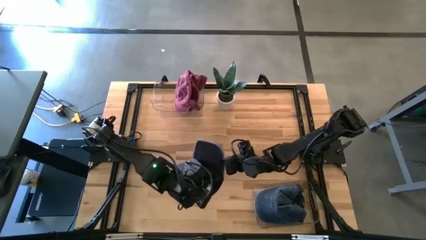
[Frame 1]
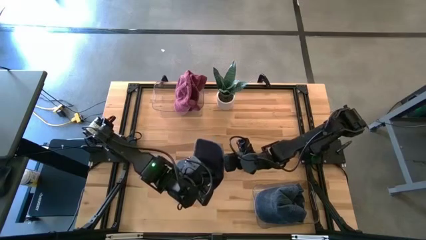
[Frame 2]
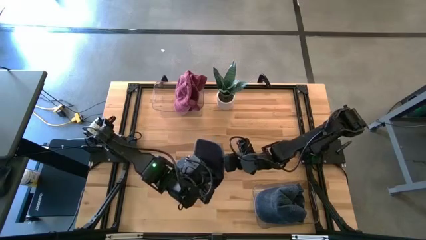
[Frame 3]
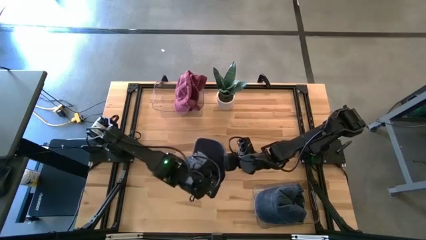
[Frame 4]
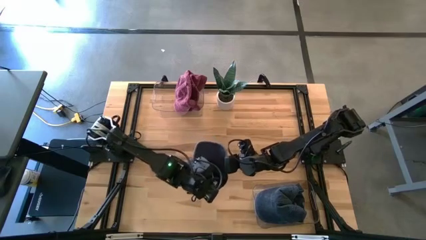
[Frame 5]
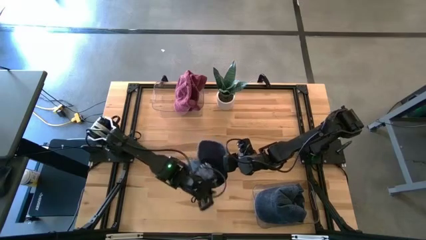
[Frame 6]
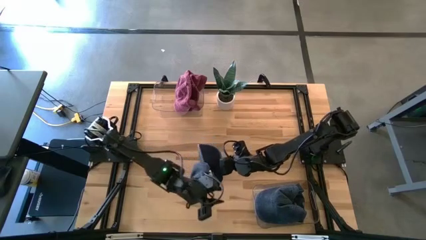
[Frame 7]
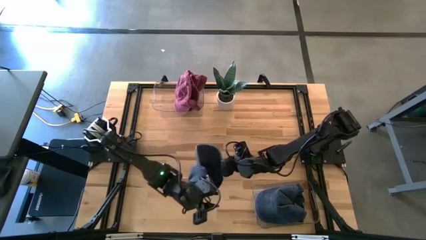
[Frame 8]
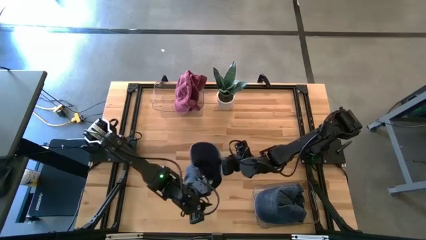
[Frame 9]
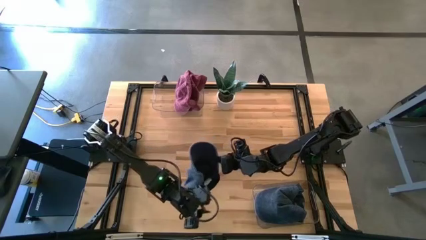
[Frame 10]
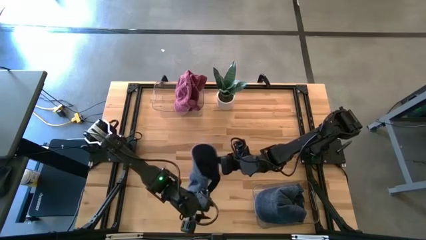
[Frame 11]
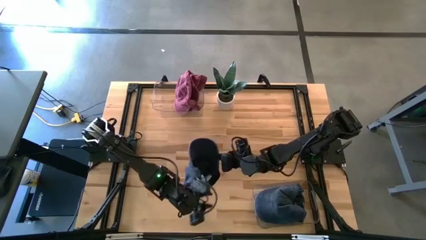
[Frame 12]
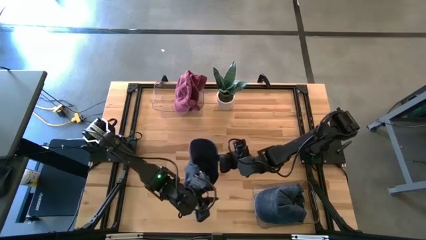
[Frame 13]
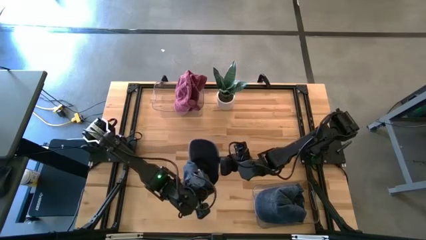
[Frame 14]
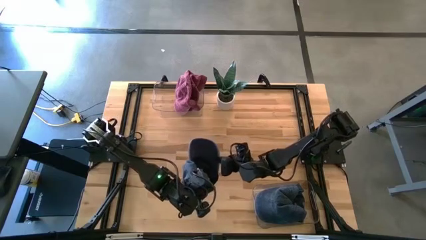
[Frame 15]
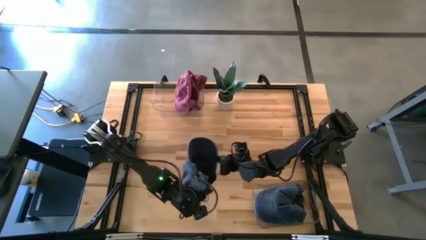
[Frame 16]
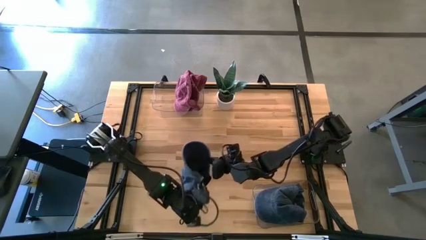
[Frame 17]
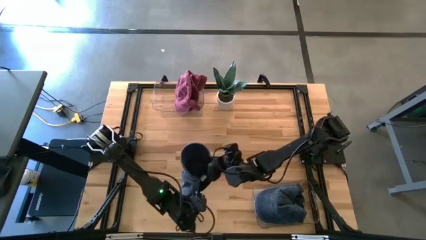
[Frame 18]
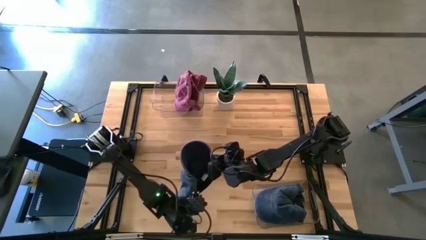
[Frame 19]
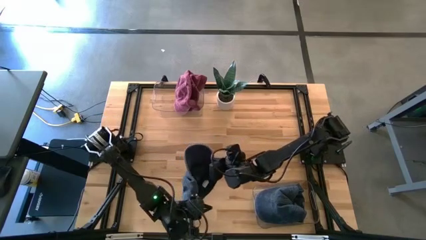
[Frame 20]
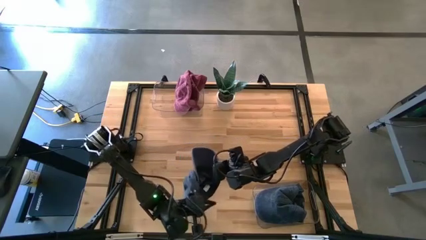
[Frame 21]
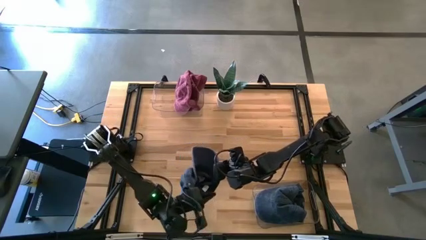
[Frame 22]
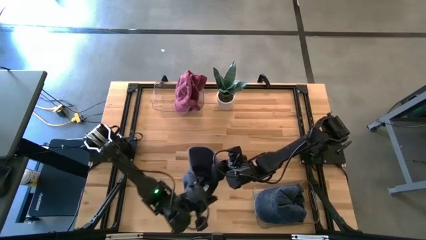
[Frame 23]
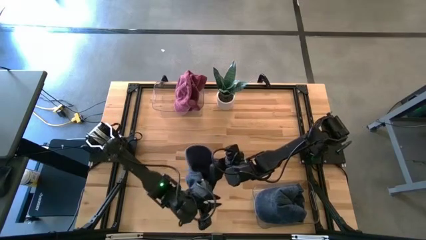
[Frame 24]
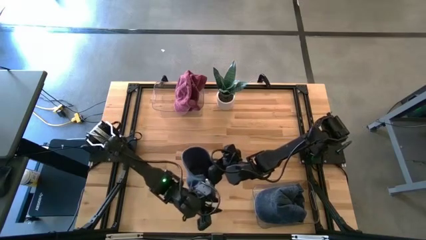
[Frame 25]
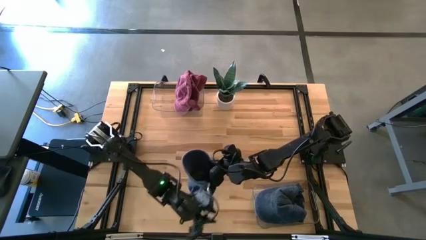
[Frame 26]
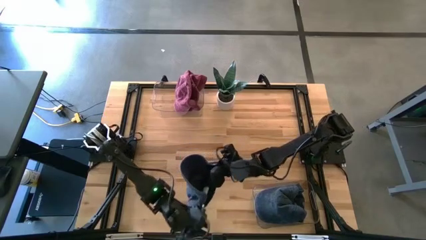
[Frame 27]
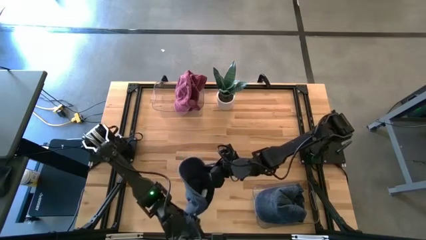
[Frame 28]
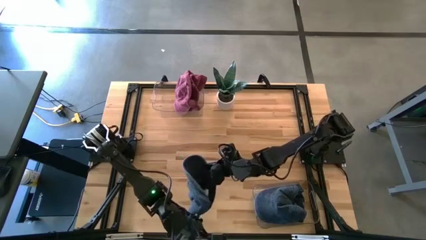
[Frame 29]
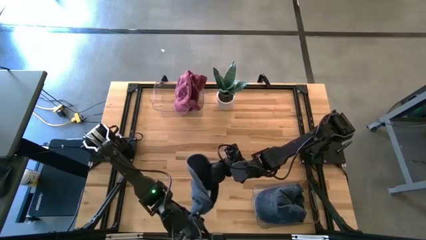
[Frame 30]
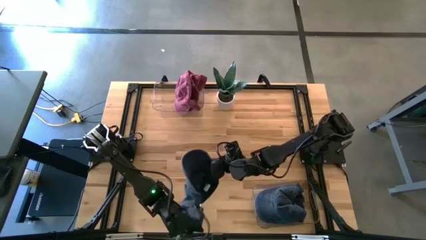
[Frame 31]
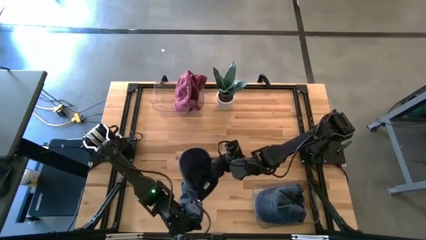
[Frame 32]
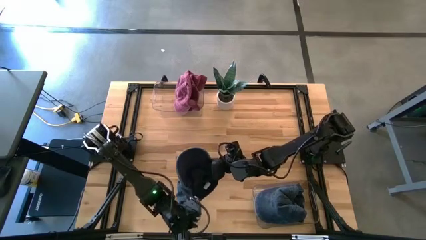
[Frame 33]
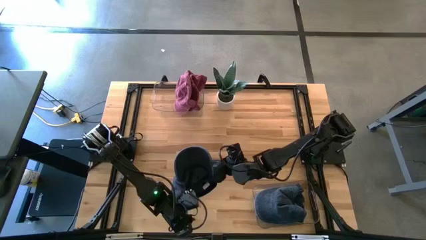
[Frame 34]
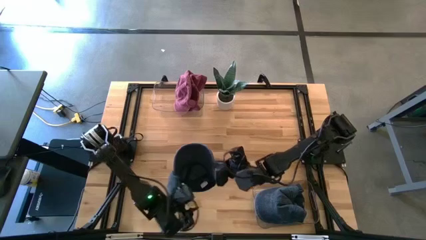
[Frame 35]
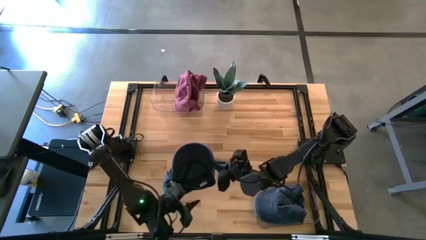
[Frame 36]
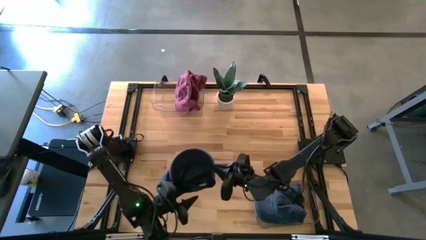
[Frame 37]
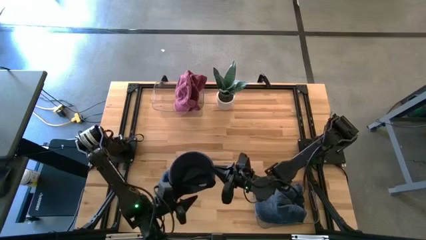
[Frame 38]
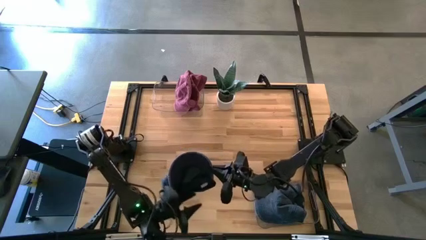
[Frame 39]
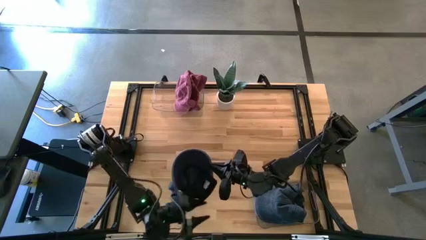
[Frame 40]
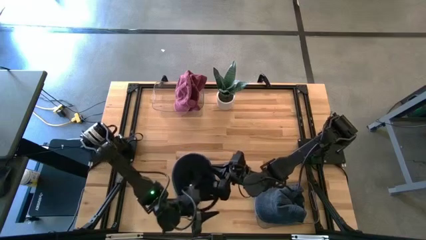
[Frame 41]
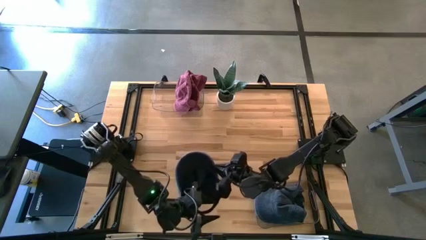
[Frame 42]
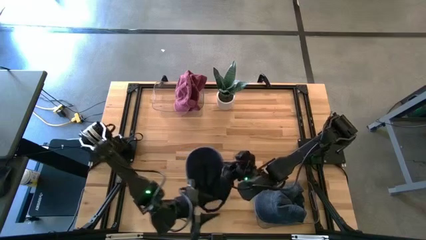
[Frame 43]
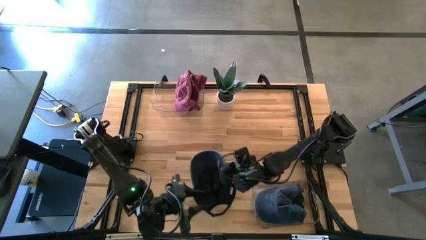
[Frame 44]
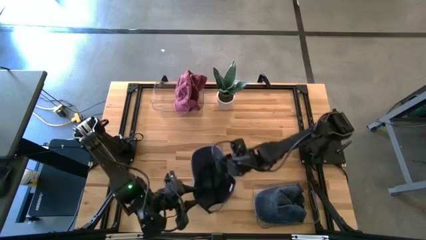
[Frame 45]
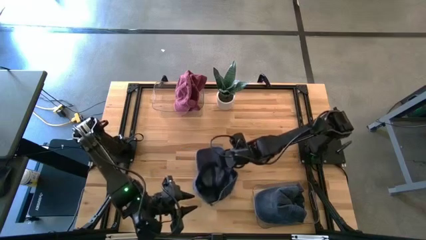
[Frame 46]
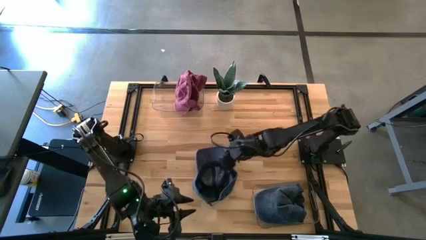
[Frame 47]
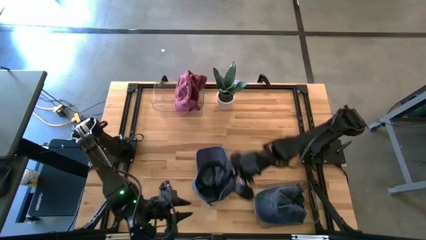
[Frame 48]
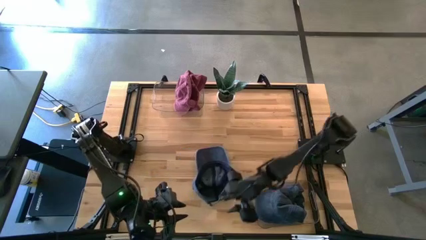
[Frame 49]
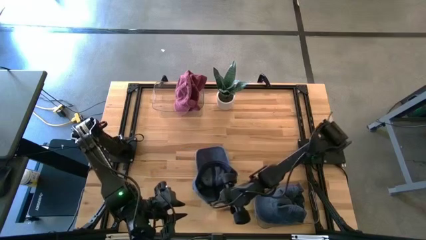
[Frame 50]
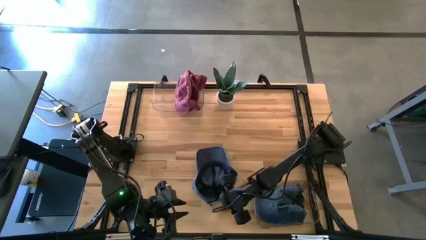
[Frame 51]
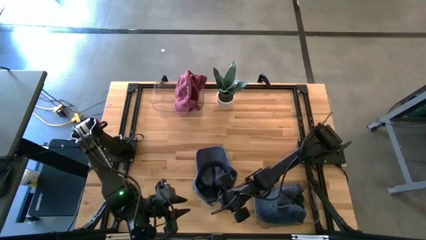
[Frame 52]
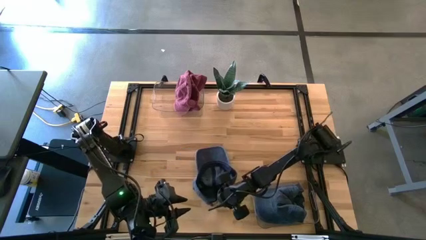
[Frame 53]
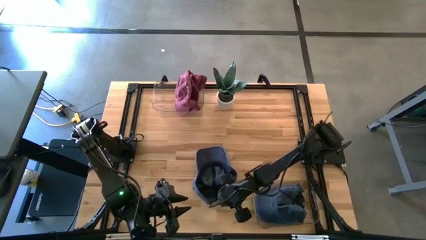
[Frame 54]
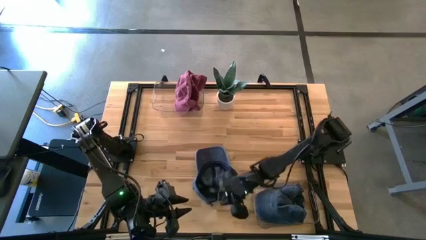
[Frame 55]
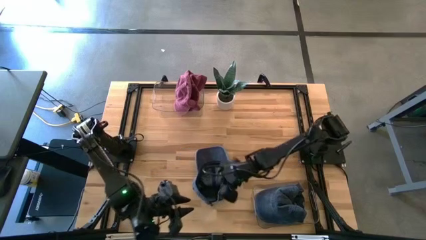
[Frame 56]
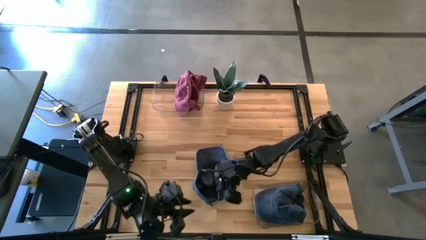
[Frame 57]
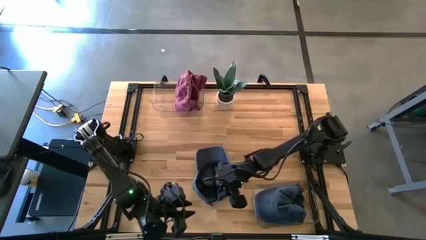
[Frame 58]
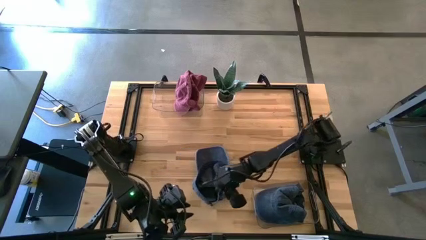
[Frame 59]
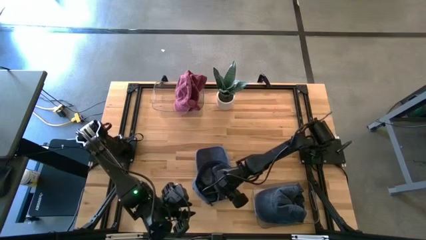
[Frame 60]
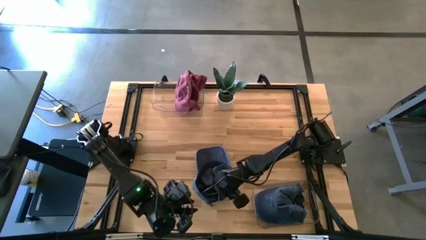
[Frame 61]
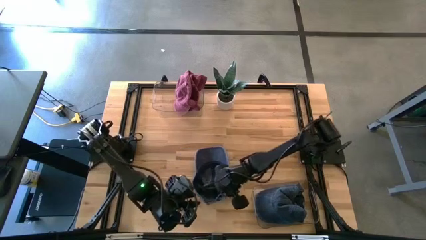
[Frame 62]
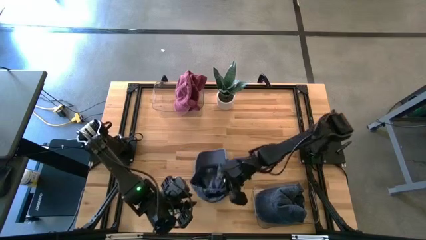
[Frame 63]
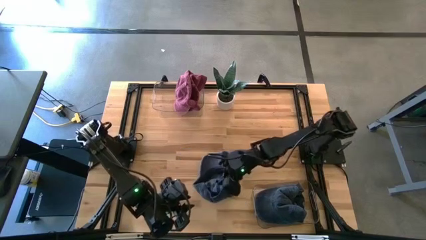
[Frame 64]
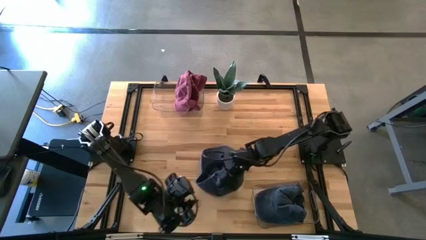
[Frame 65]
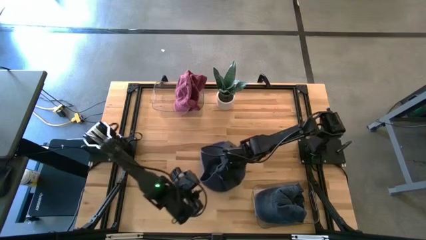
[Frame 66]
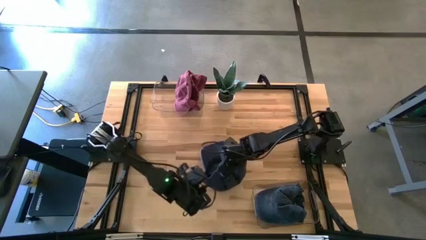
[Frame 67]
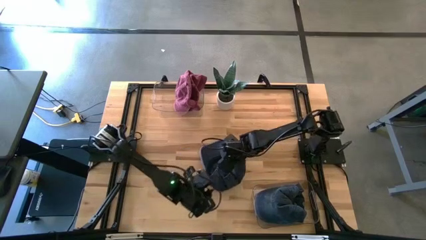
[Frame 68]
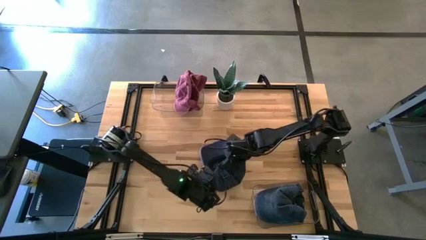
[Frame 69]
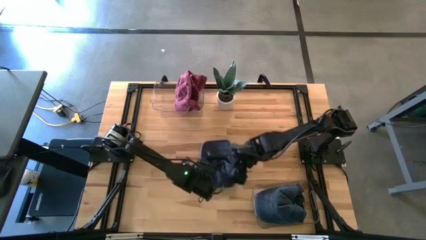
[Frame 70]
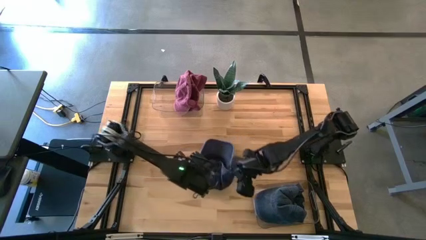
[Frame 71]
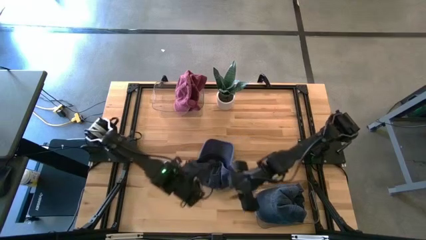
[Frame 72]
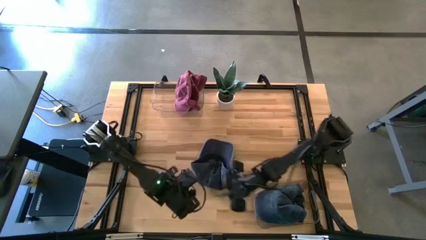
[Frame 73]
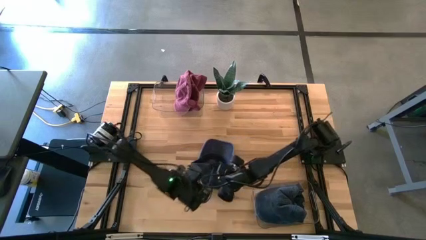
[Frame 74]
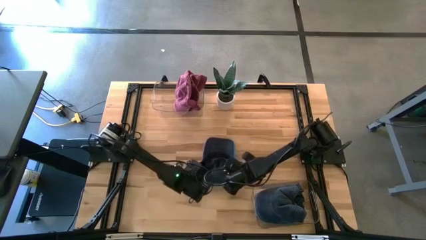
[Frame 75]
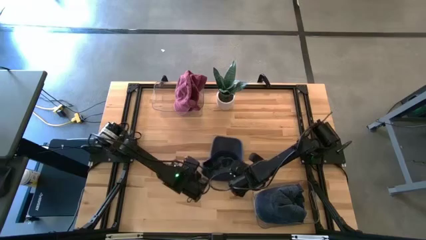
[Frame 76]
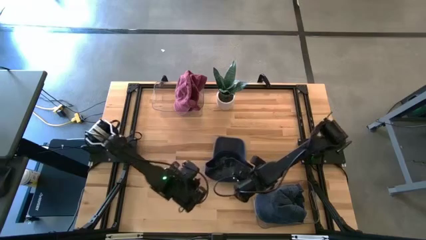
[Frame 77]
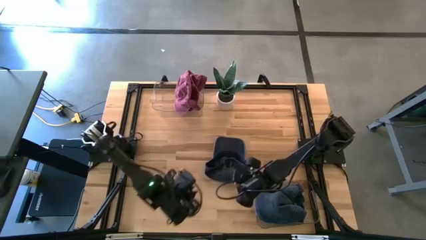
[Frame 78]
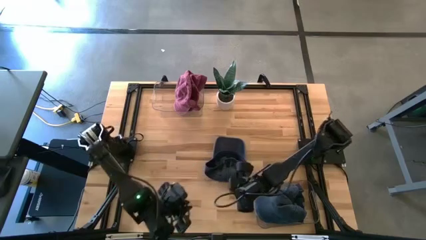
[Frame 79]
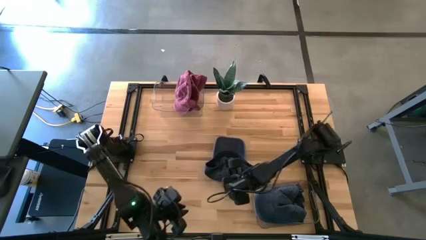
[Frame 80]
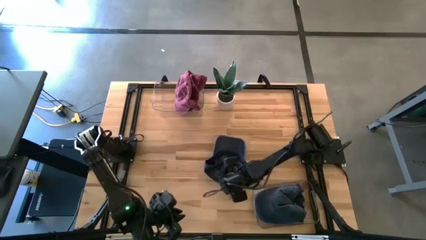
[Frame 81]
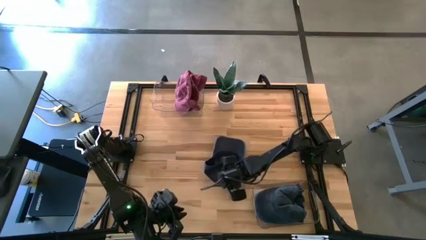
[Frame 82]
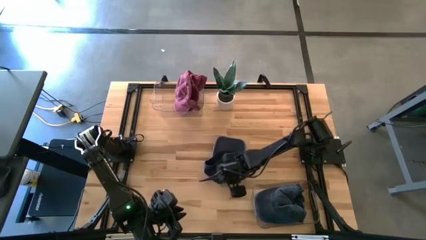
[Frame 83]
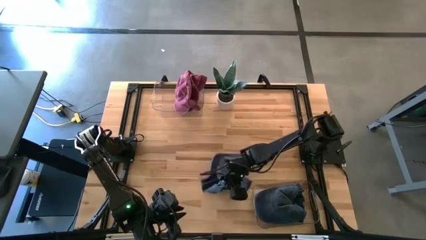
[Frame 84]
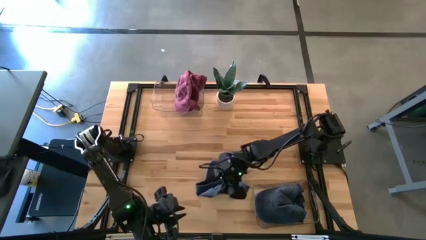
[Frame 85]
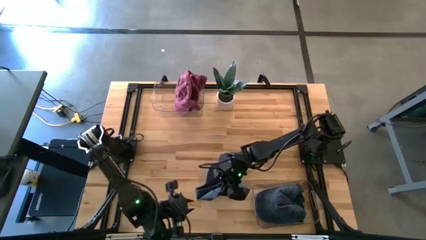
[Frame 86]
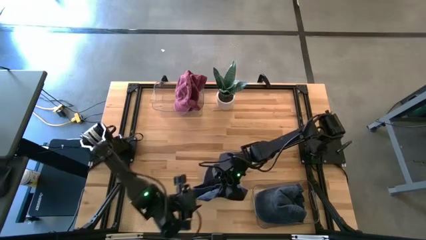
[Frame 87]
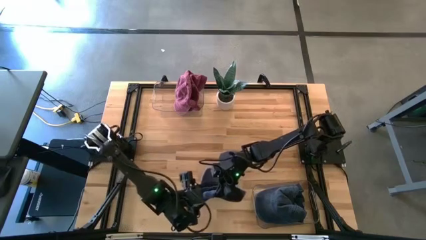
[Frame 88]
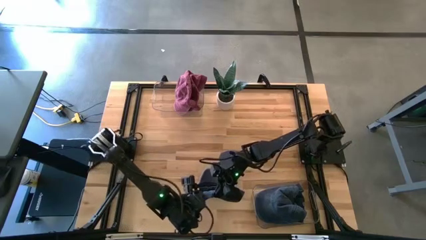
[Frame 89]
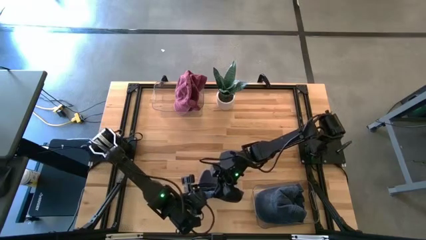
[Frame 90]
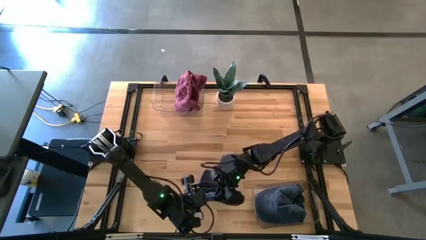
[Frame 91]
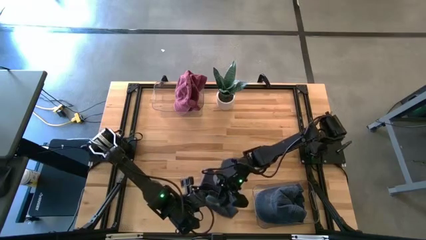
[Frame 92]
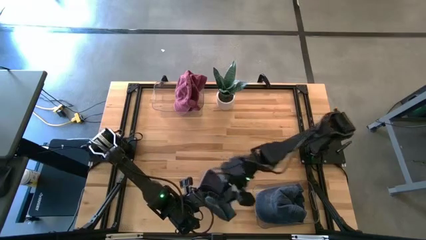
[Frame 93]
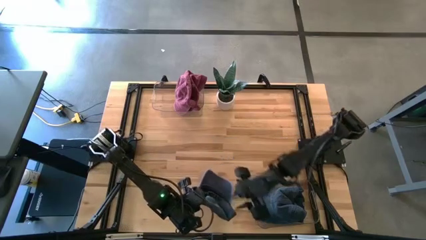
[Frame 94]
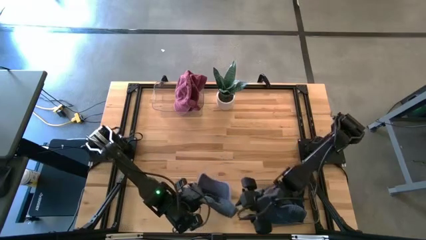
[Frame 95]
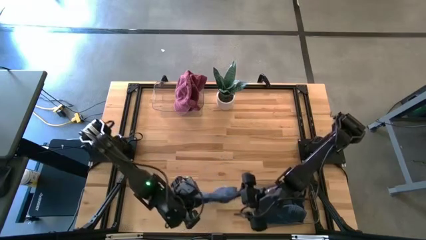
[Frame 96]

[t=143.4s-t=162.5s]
Task: Pick & Place hat
Put the blue cap into the bottom transparent bin
